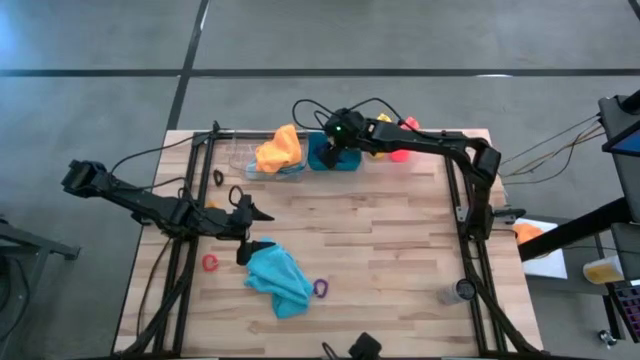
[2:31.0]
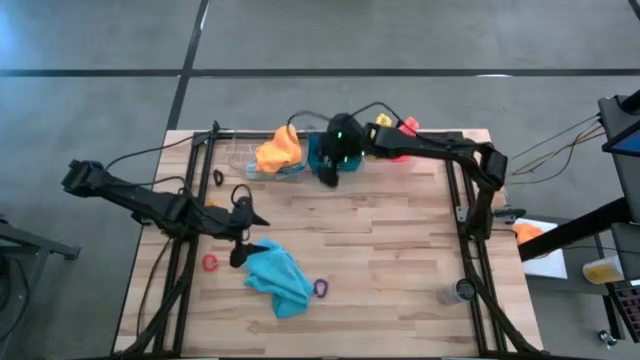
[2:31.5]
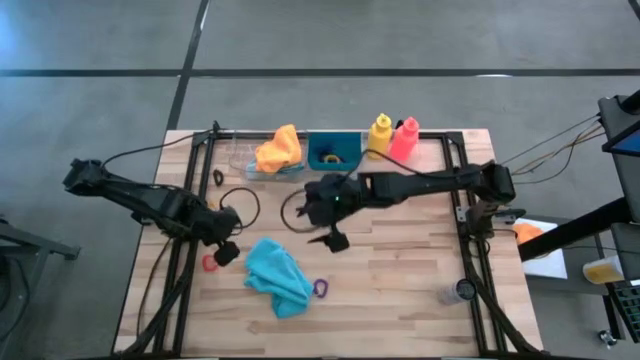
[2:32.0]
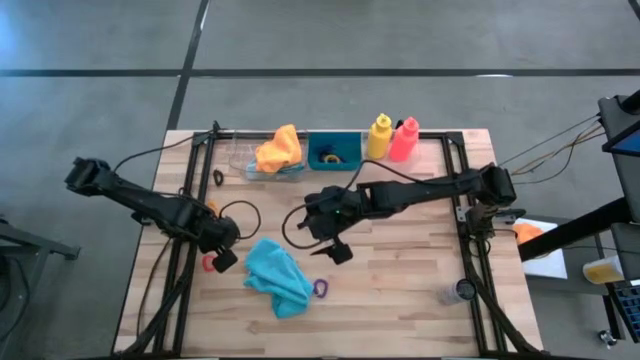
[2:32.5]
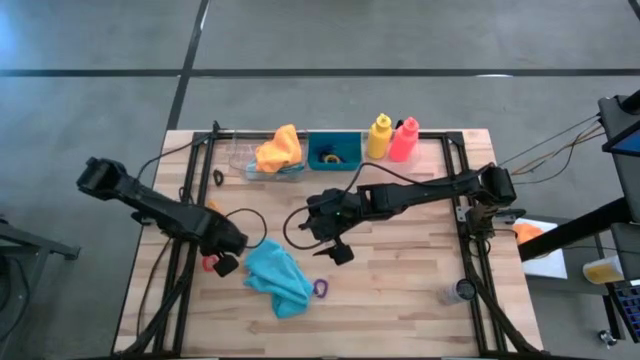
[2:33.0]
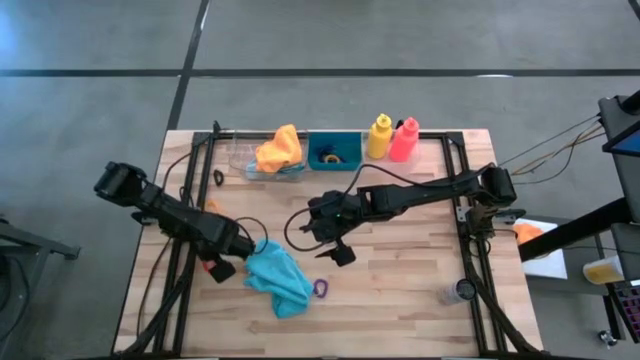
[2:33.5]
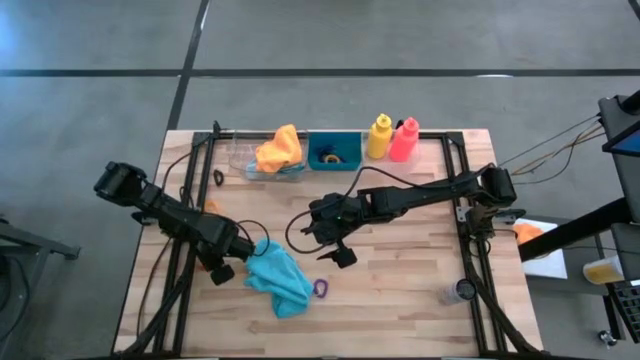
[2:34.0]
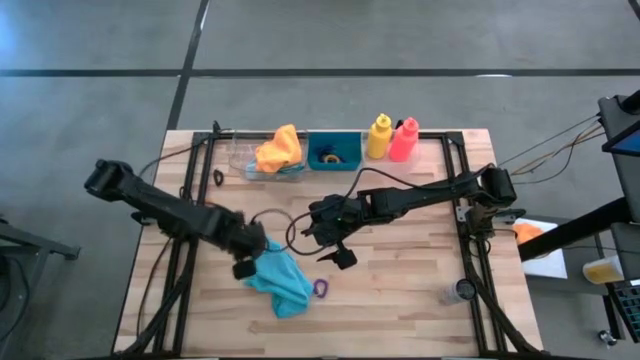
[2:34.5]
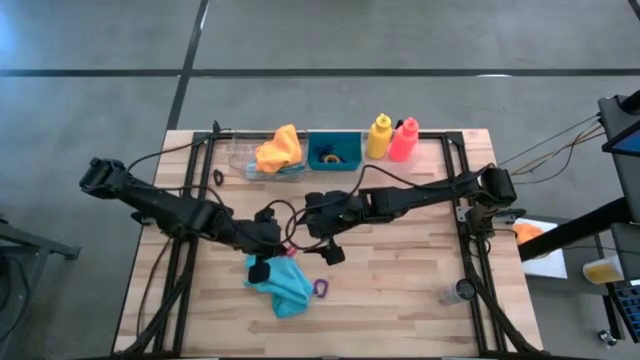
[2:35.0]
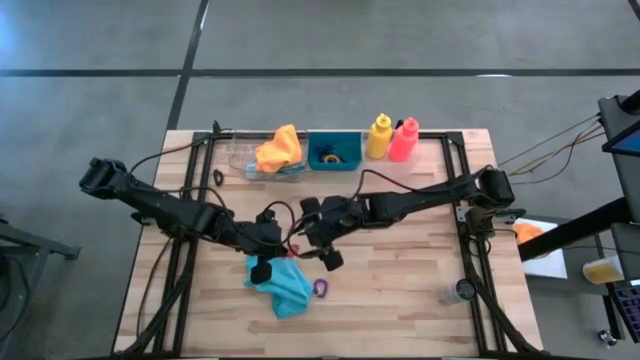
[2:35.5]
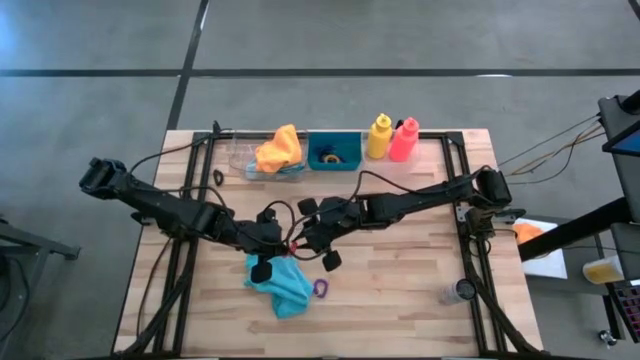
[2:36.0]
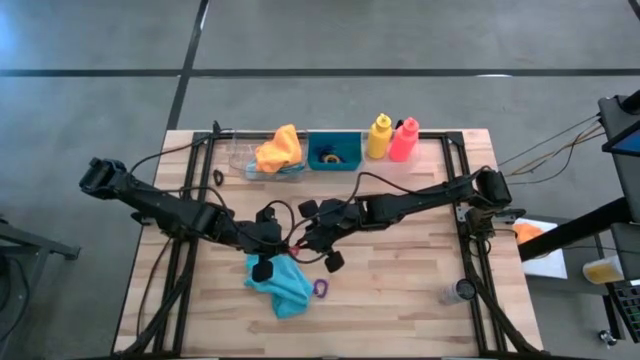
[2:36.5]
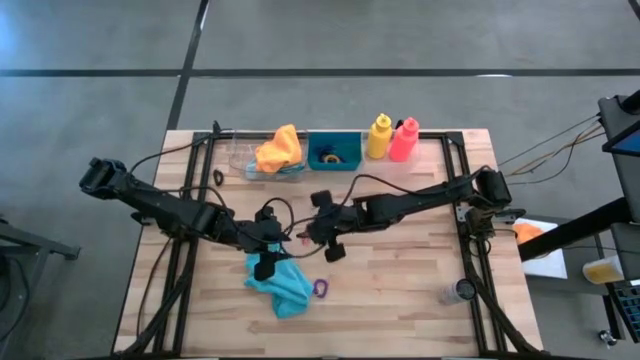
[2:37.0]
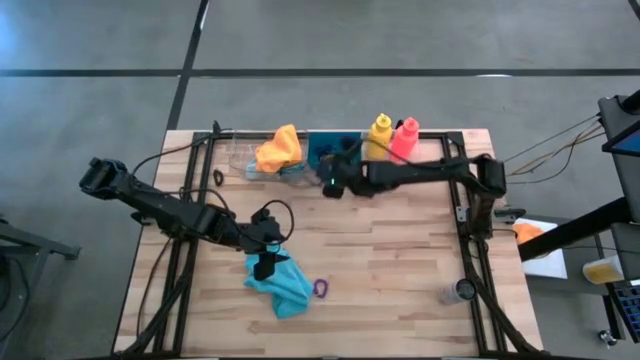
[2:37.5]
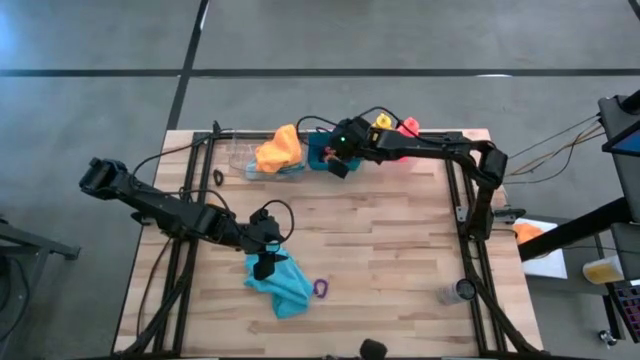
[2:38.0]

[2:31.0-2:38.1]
Task: Pick & Place Sports Items
Put the orange spring keychain into the blue bin

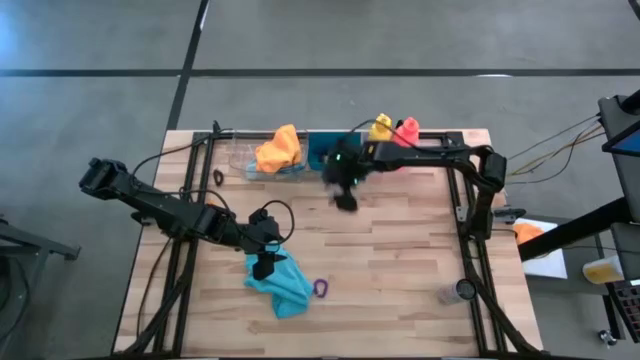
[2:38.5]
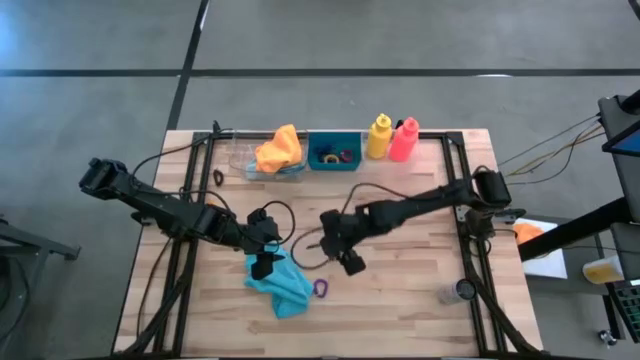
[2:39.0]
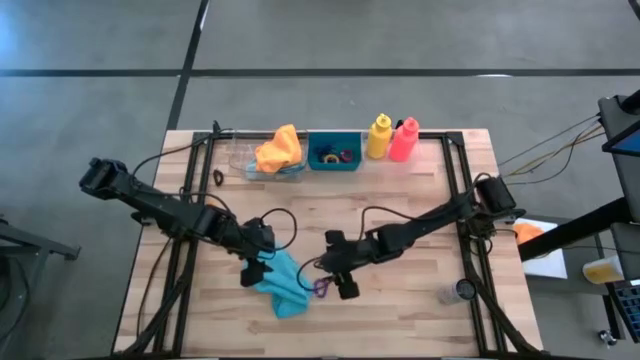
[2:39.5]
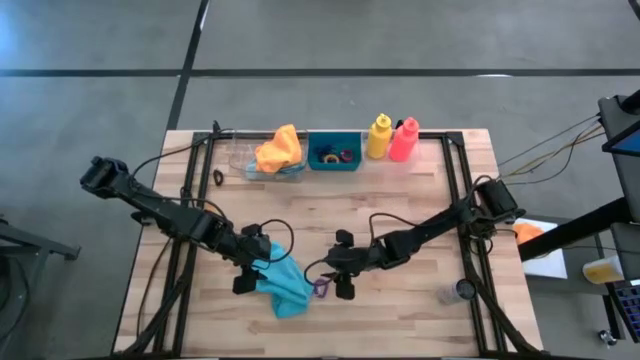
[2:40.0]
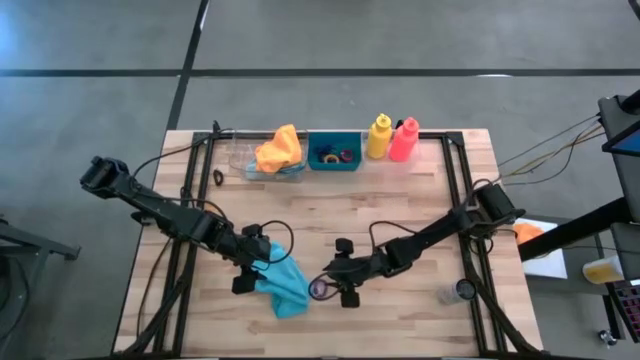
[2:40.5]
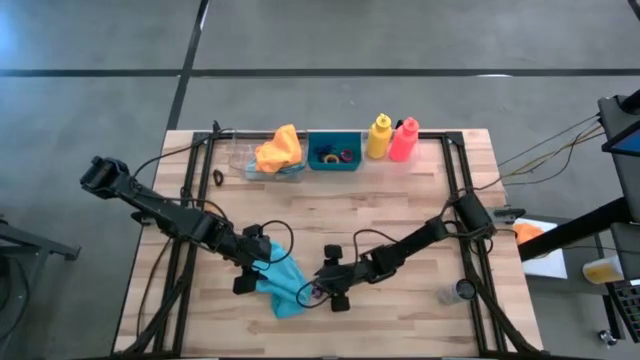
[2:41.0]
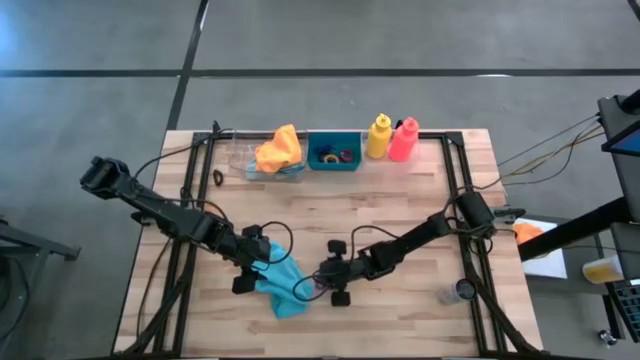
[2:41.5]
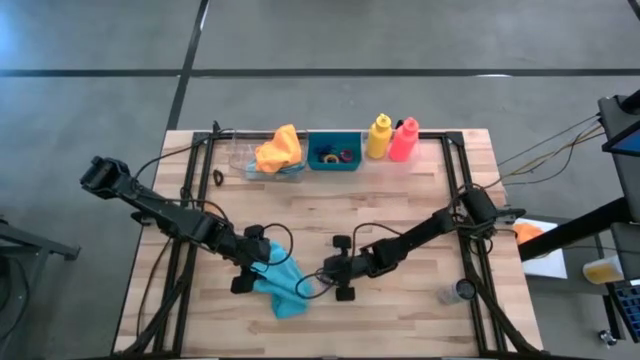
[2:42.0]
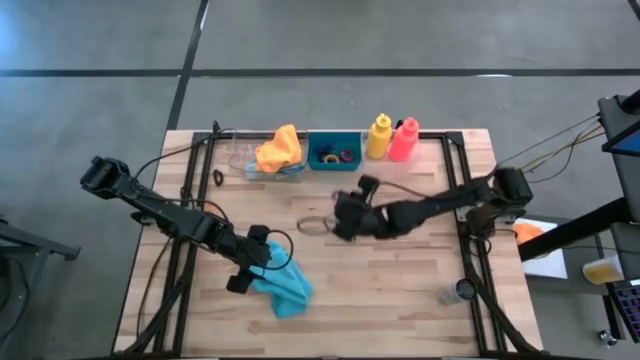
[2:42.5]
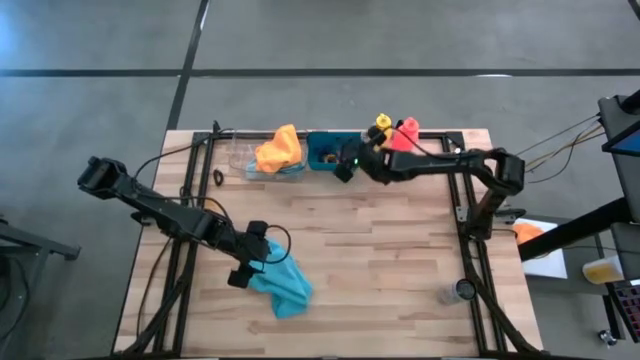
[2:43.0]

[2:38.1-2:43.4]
Put the purple spring keychain into the blue bin

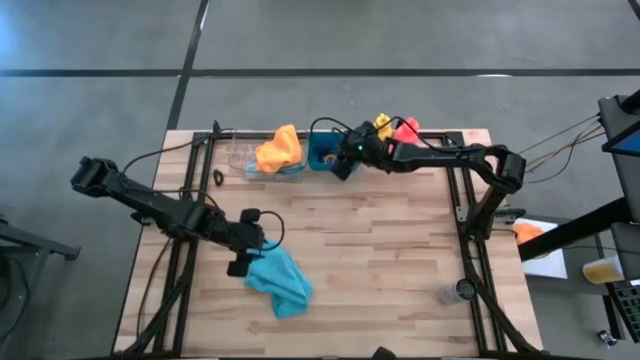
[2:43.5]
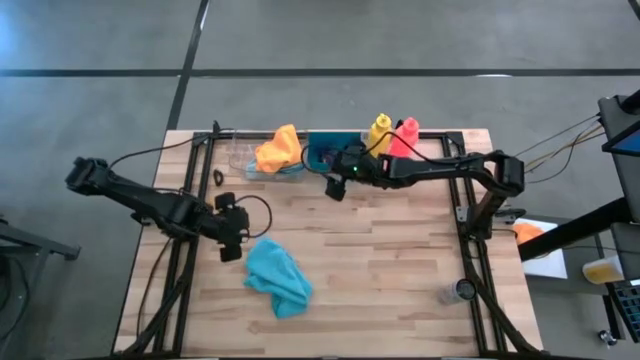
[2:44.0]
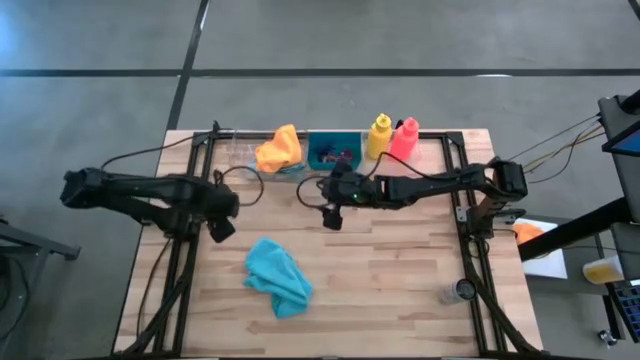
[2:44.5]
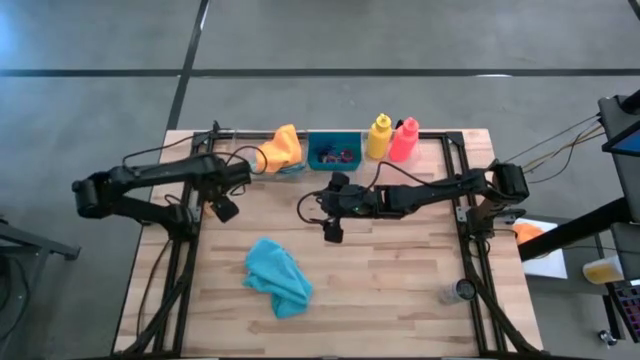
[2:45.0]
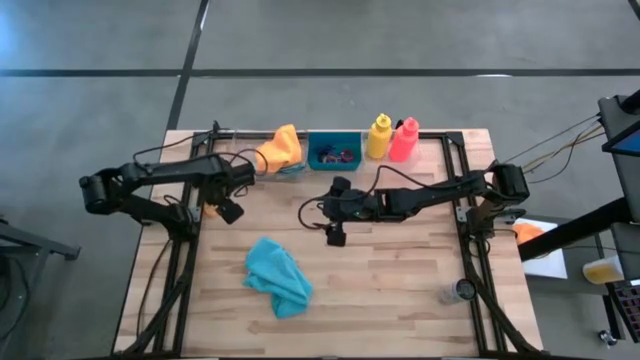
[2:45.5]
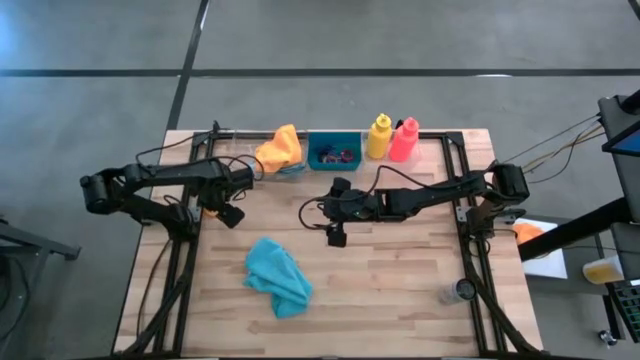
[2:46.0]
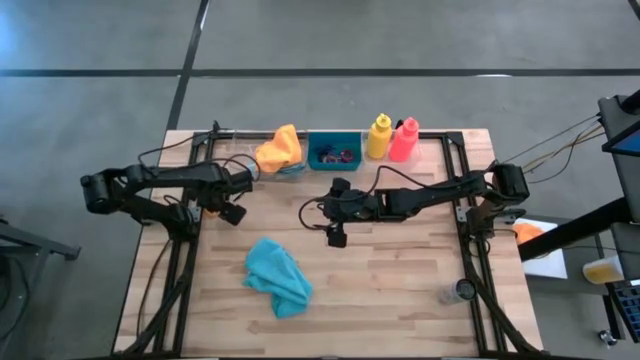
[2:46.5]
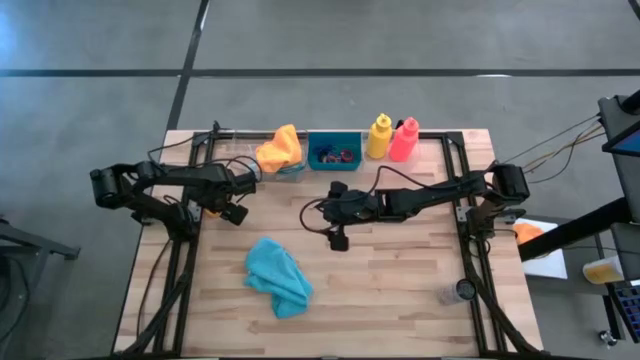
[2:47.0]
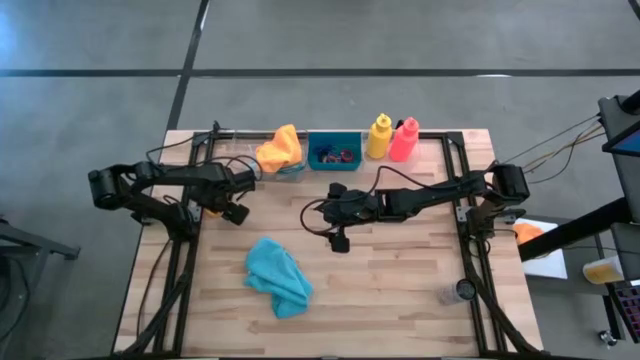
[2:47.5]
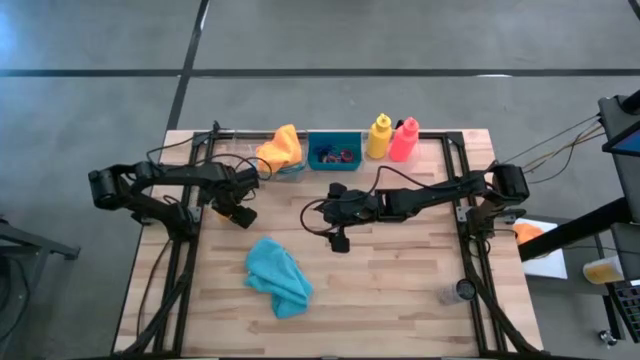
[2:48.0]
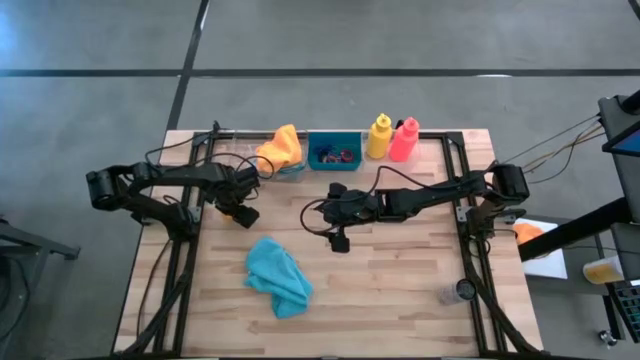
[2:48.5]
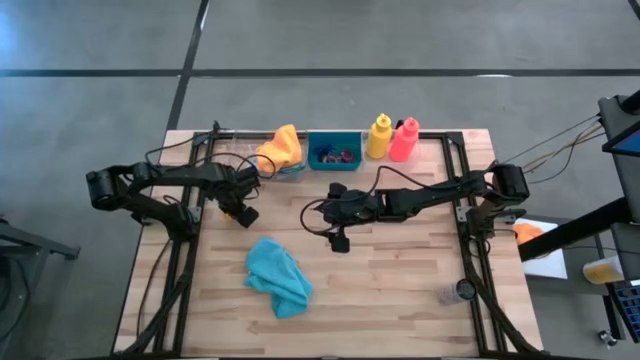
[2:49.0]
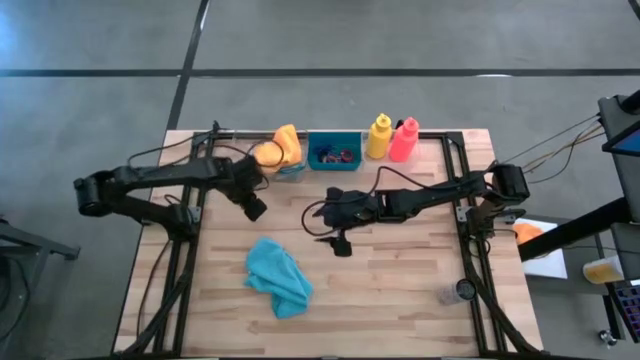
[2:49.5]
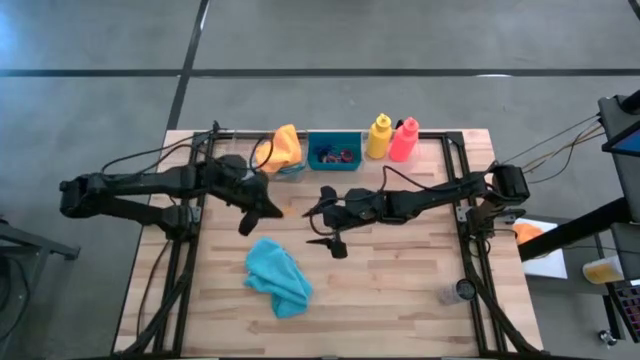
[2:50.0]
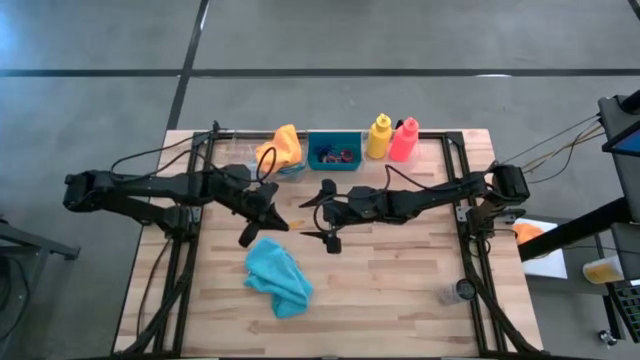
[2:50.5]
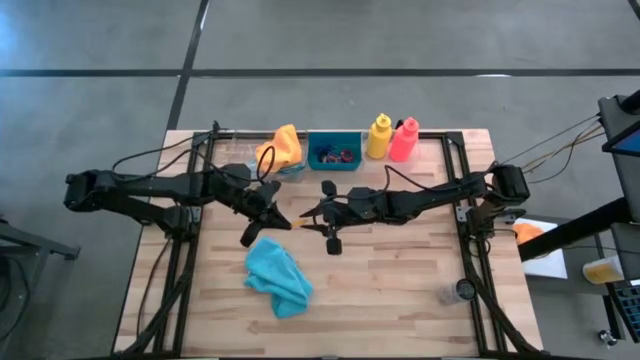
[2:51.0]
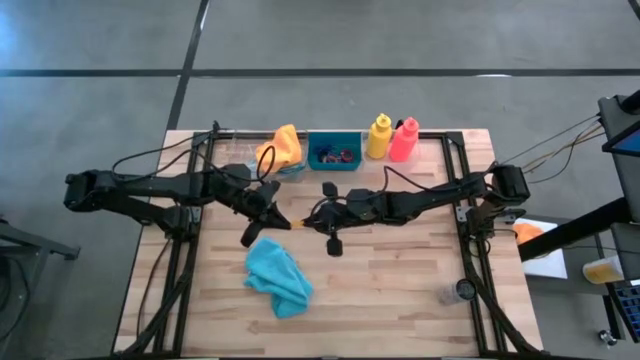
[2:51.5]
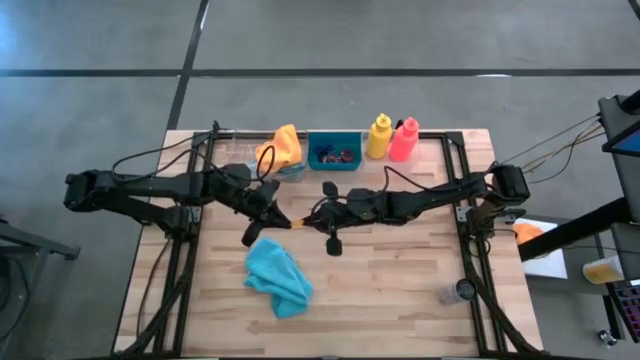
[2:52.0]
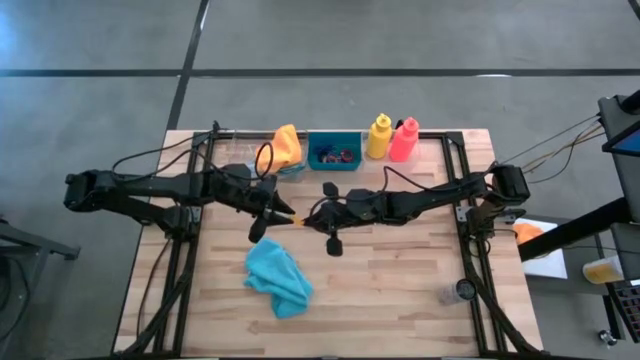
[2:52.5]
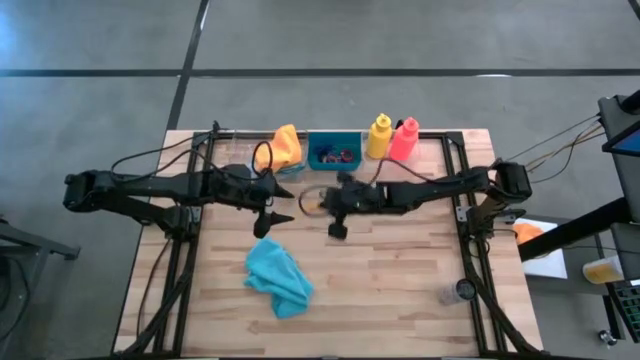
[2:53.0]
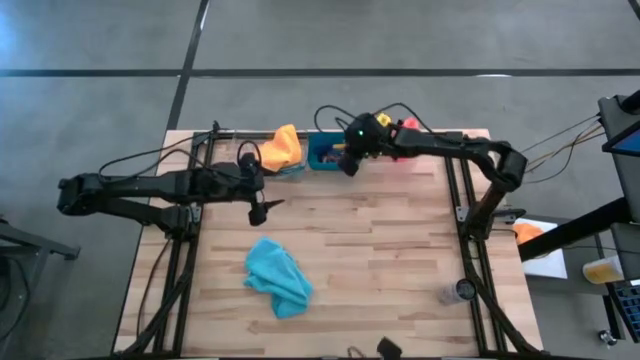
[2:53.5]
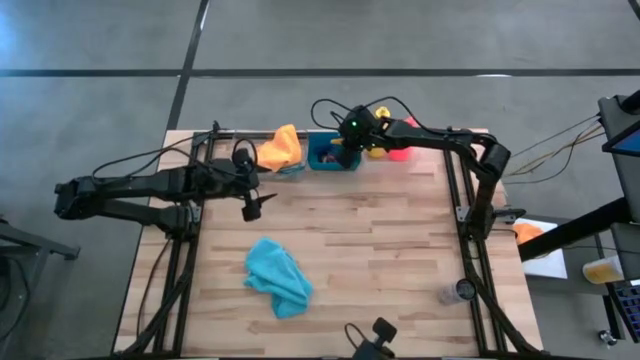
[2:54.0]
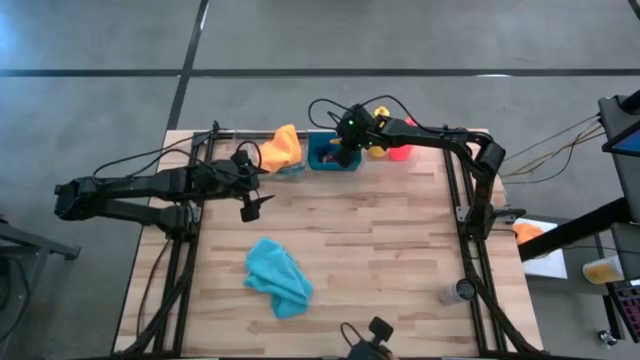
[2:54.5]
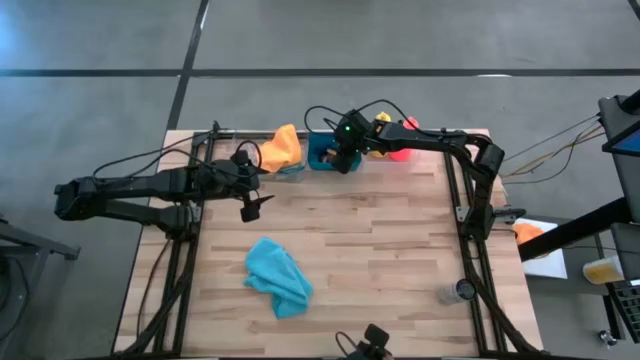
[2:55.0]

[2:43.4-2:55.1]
Put the yellow spring keychain into the blue bin
